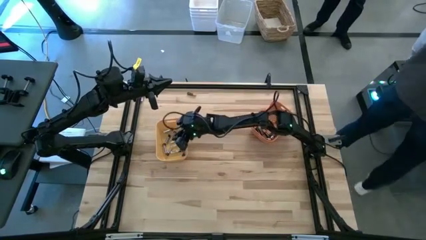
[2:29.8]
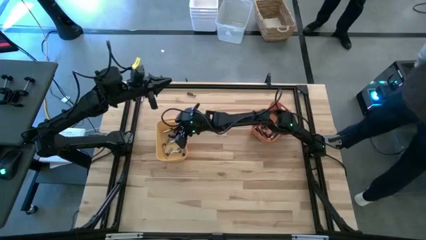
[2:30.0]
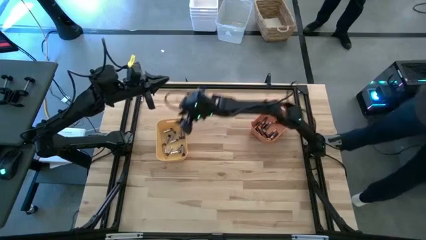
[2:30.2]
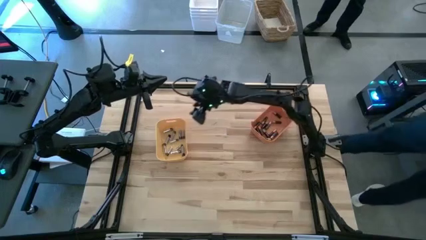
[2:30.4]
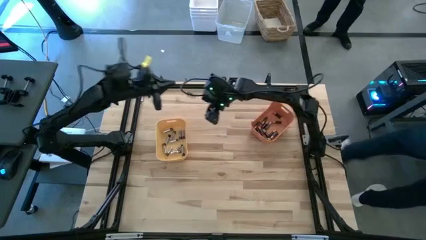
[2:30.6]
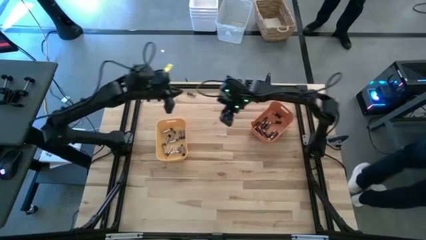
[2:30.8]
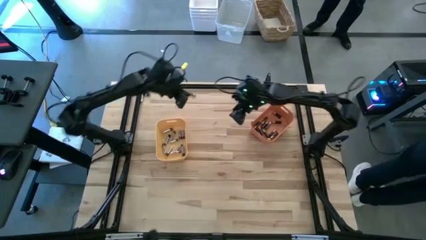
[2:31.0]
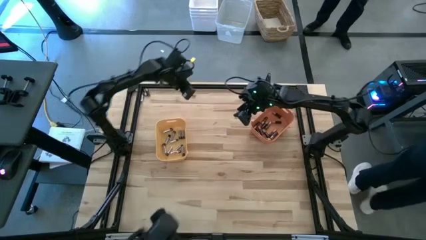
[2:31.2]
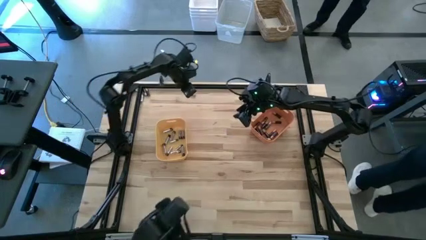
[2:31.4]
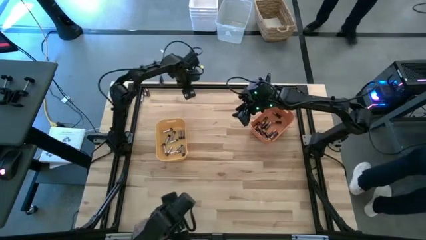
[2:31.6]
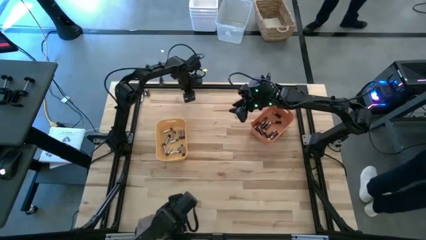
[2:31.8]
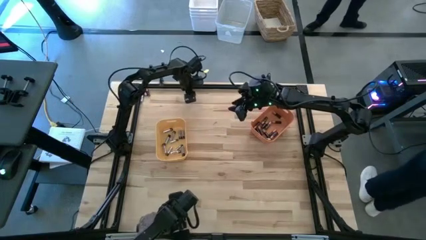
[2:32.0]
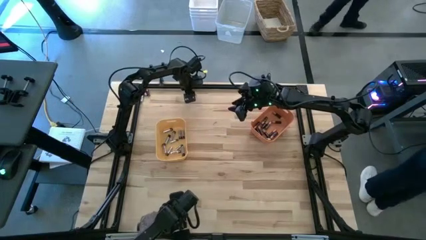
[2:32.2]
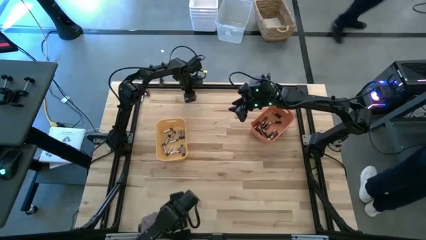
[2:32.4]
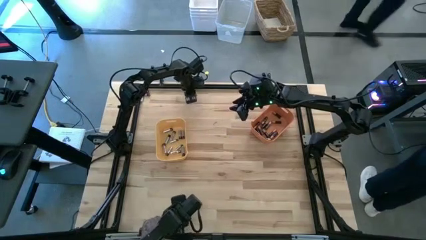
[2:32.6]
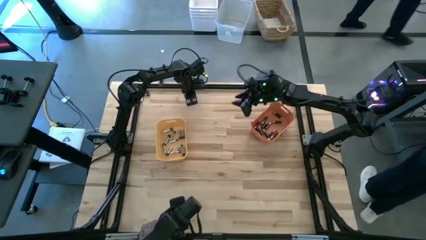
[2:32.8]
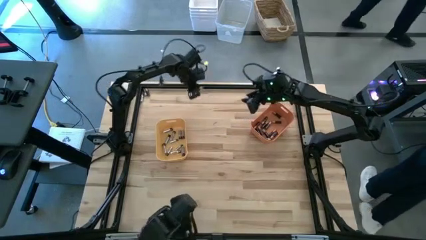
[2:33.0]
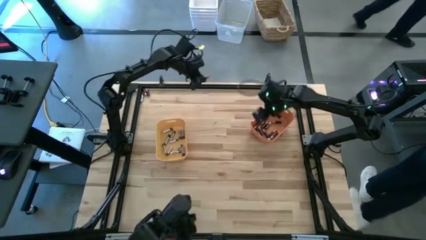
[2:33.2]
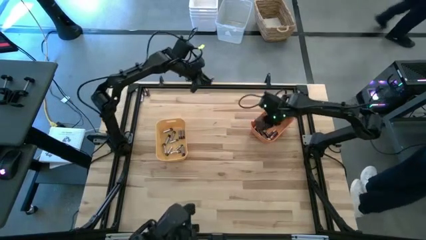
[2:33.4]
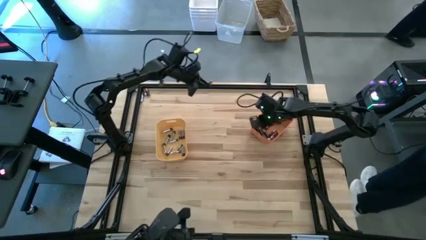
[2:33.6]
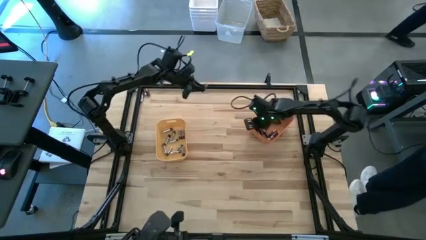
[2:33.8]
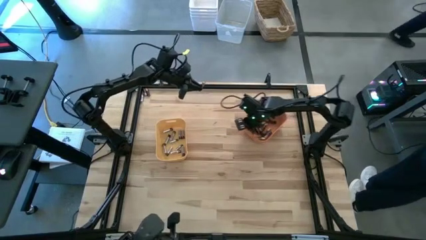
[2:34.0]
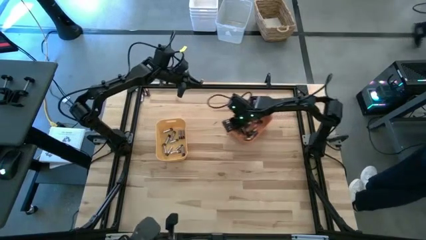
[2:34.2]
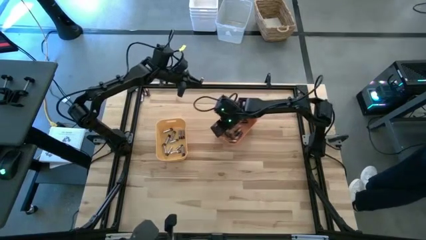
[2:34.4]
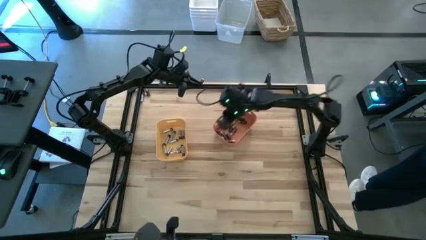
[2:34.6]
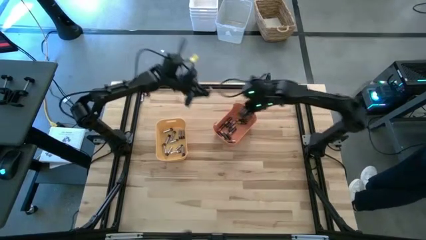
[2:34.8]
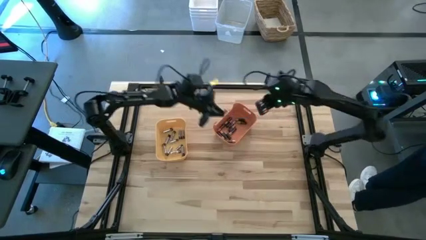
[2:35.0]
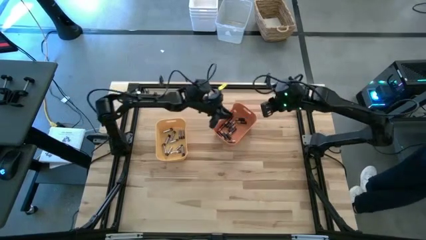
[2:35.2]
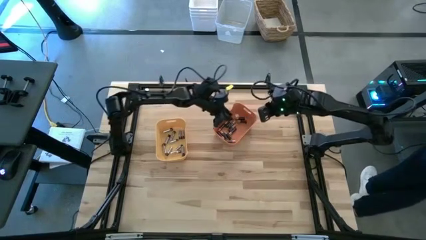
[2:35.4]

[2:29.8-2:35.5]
Task: Sort batteries
Put the black battery into the orange bin

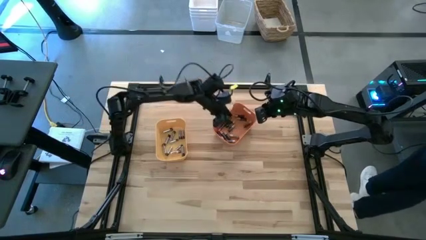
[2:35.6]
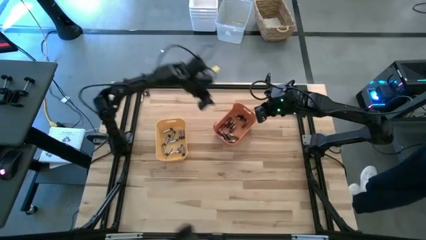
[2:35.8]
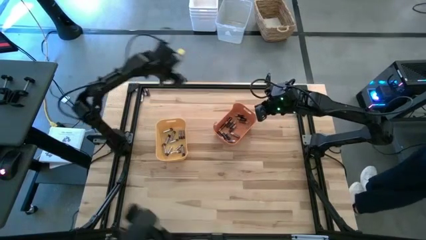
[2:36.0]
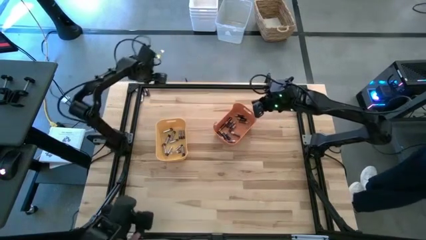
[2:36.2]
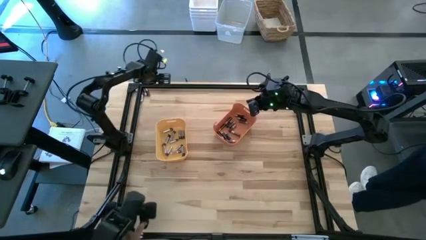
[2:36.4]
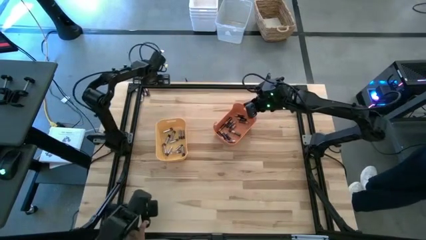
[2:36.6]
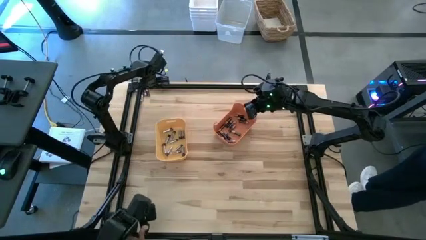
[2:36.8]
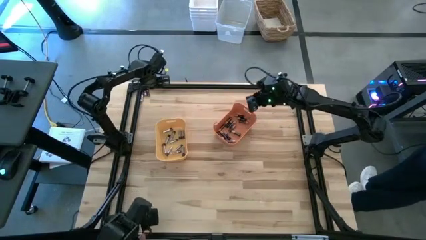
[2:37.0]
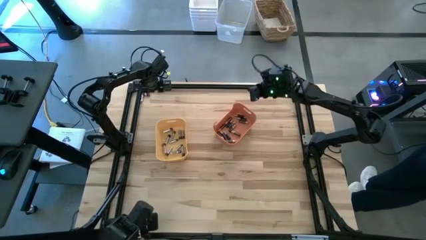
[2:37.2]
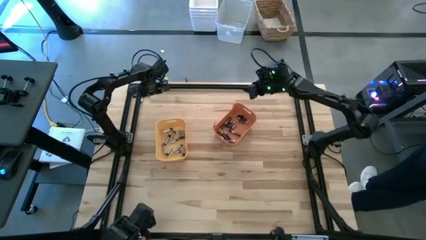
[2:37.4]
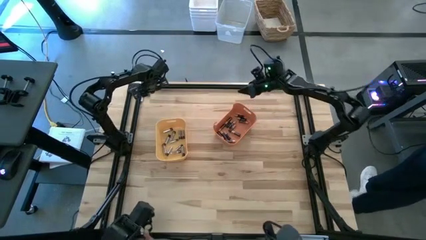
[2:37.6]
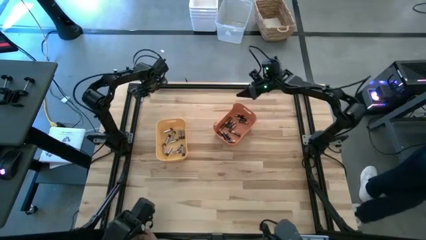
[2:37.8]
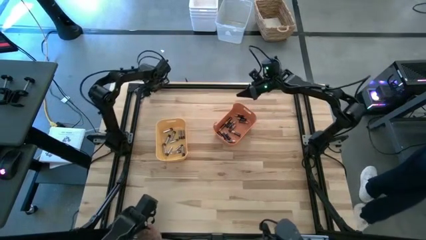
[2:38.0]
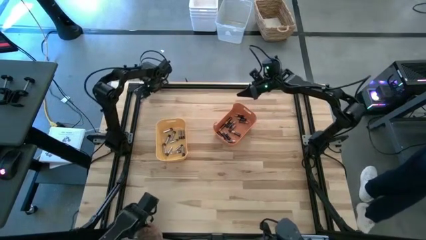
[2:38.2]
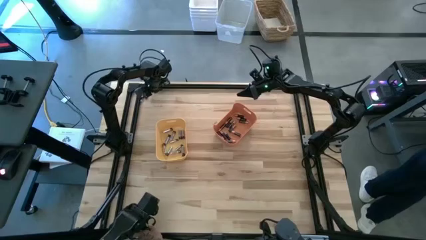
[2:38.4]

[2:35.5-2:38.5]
Put the black battery into the orange bin

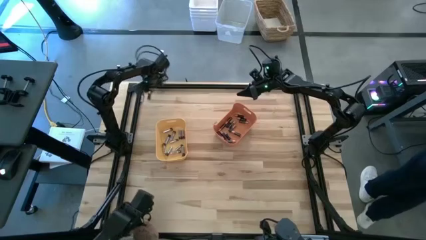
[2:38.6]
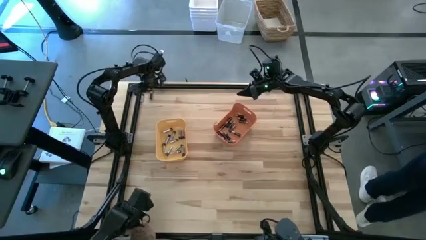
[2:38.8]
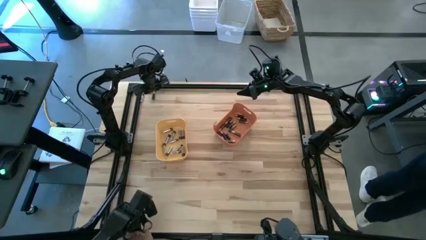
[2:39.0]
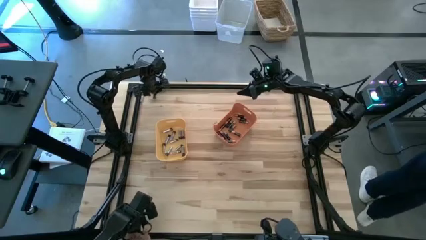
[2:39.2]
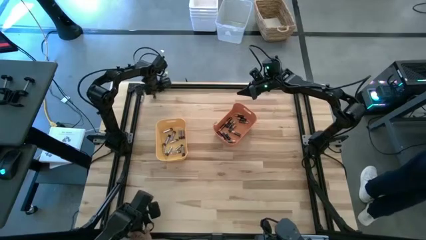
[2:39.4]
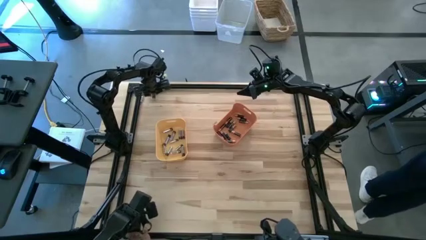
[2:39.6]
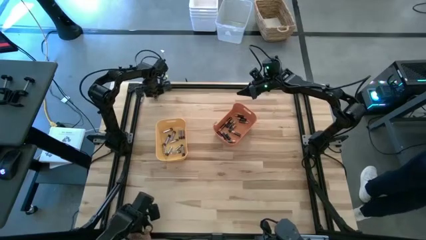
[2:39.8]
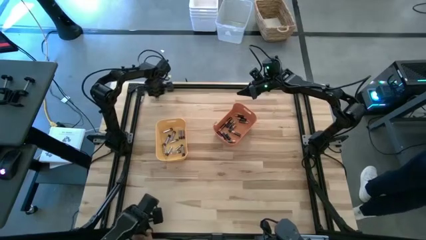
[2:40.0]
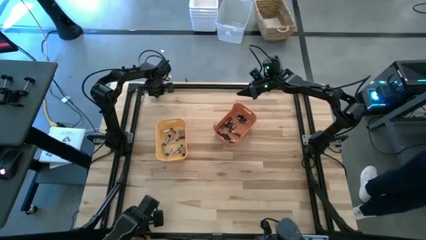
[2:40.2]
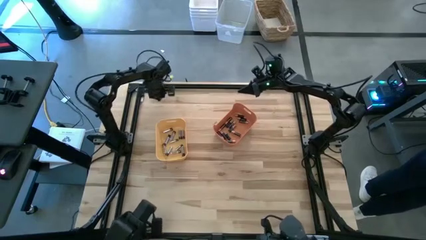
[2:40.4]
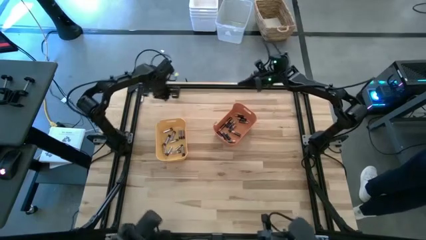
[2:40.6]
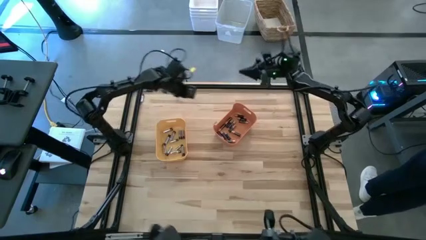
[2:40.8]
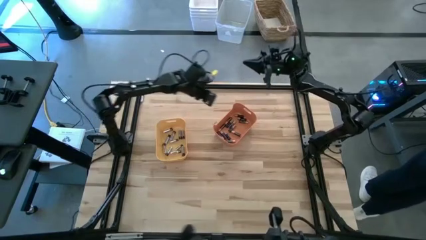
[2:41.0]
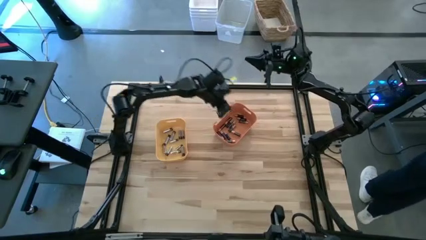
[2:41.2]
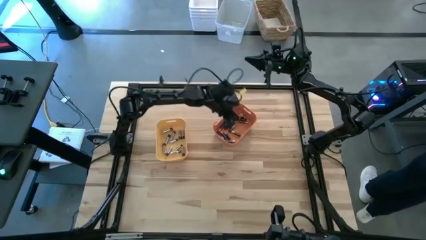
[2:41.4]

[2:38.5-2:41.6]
Put the black battery into the orange bin

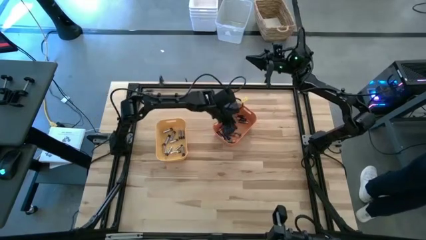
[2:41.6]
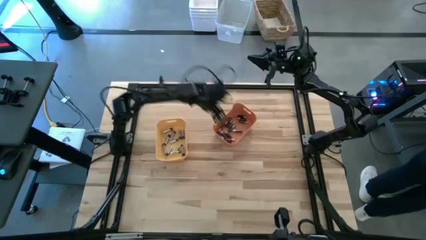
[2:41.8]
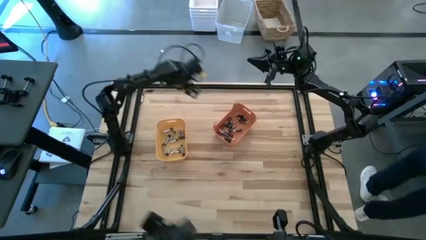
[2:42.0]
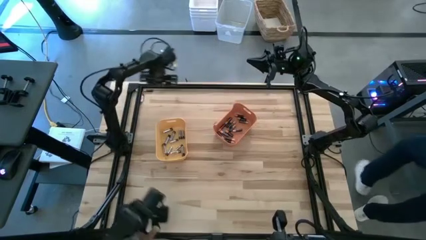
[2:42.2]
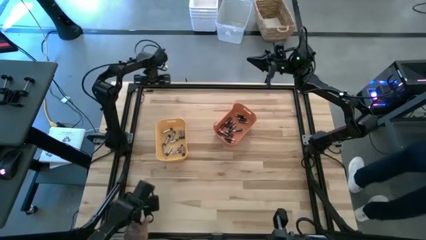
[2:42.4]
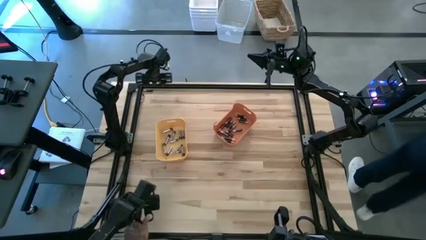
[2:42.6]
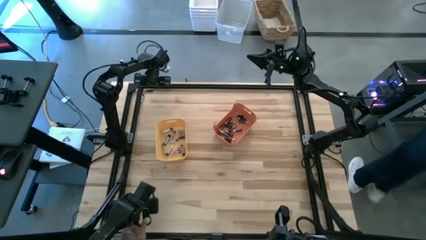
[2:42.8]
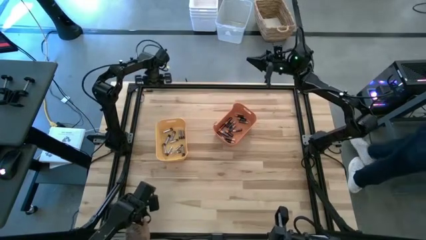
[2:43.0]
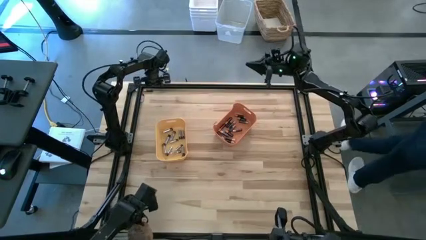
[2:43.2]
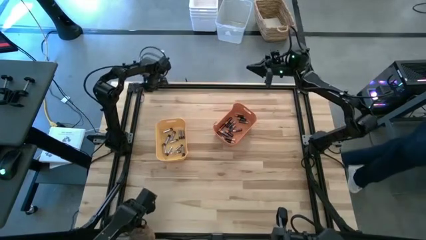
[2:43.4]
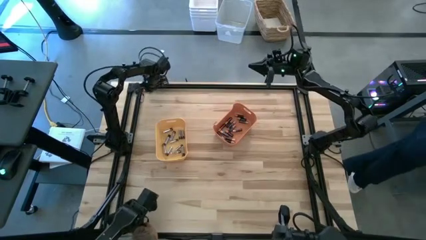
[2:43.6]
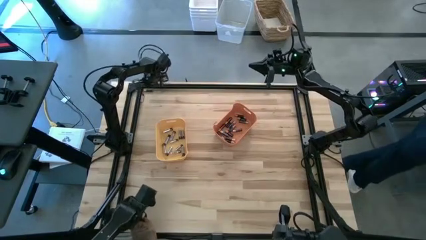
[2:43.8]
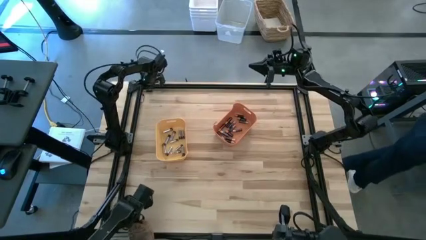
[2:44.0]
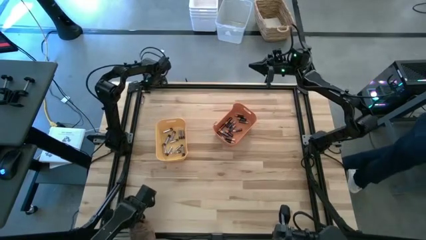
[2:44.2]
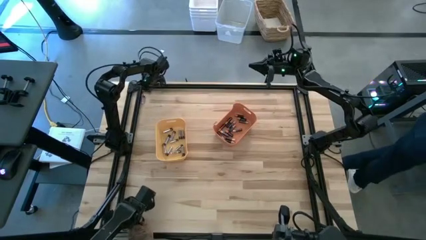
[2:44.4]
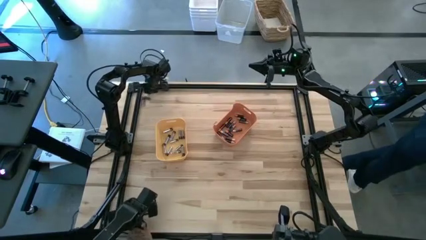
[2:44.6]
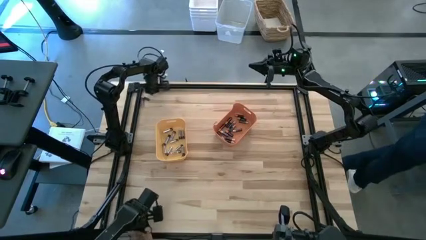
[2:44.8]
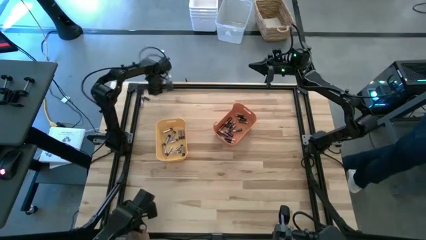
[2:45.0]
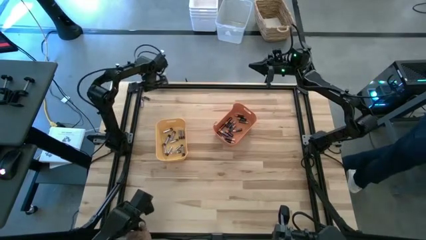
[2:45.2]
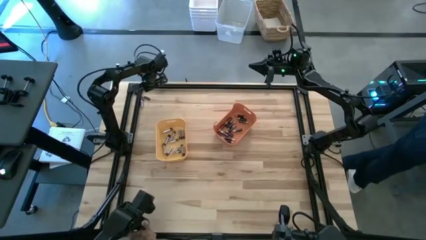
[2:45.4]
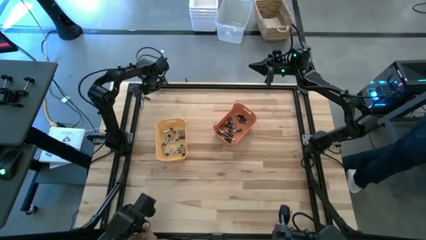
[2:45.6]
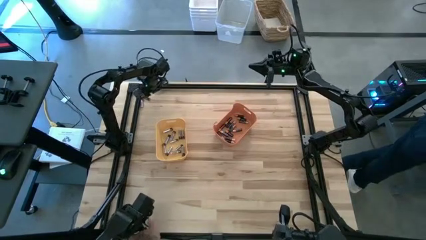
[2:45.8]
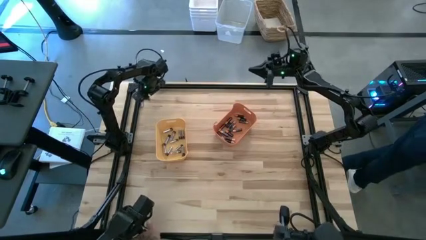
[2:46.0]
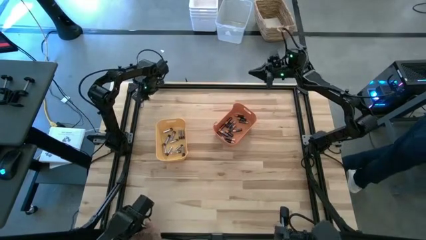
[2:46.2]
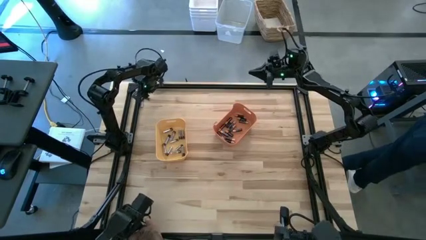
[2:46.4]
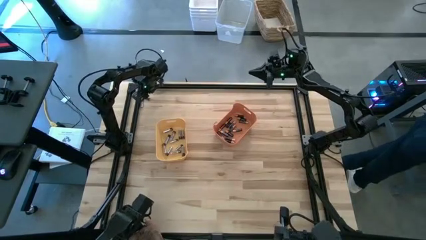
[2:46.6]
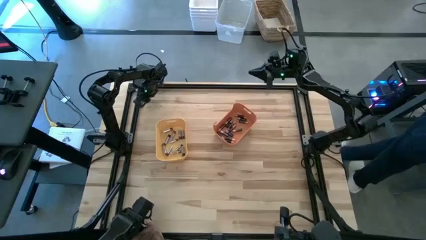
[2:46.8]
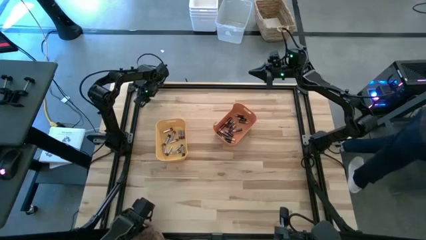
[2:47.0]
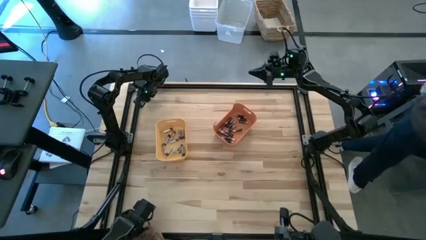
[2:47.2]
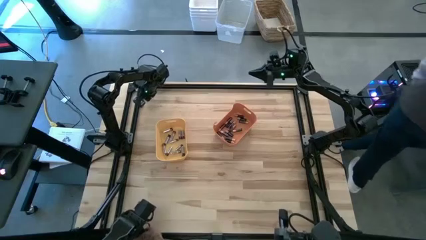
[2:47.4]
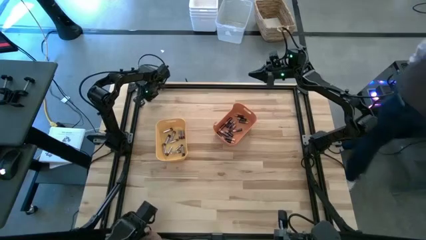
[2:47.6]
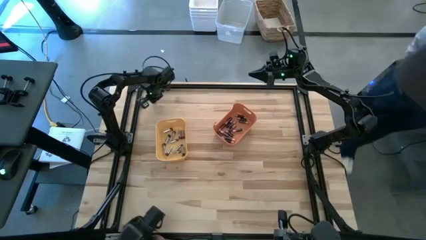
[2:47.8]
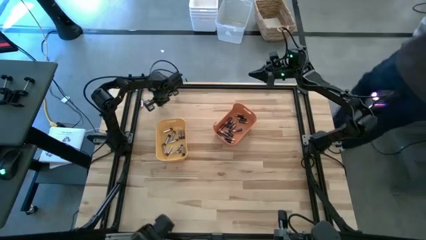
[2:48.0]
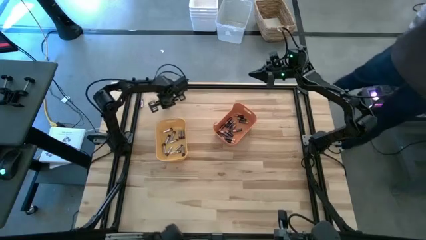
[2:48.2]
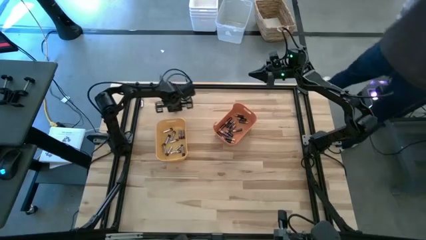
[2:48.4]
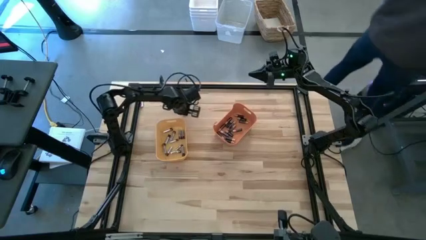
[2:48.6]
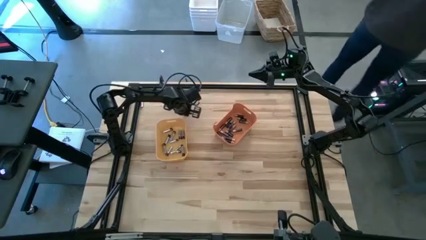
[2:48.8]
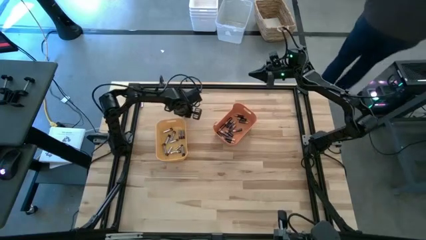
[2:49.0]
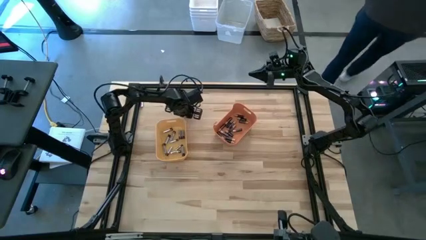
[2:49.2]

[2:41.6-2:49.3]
Put the black battery into the orange bin
